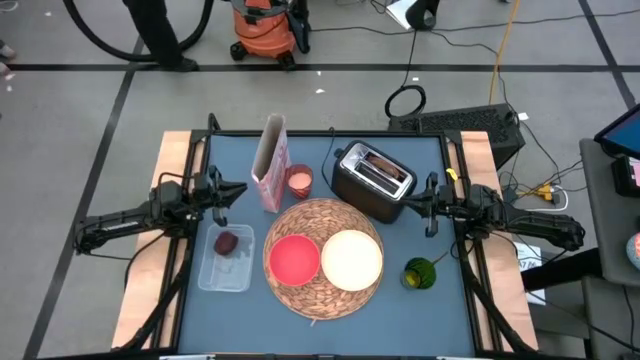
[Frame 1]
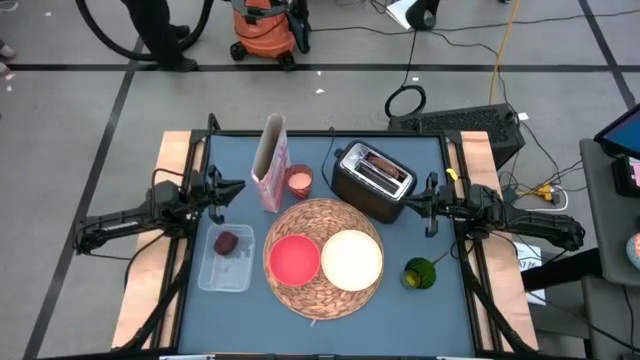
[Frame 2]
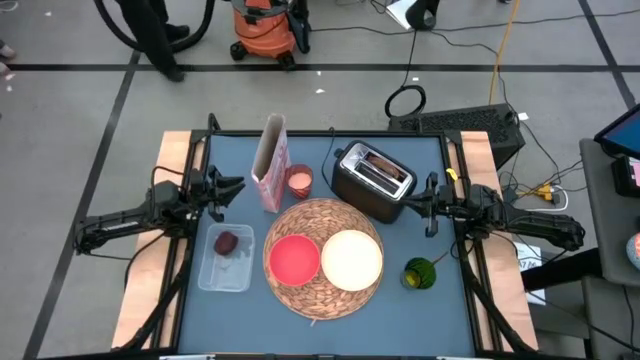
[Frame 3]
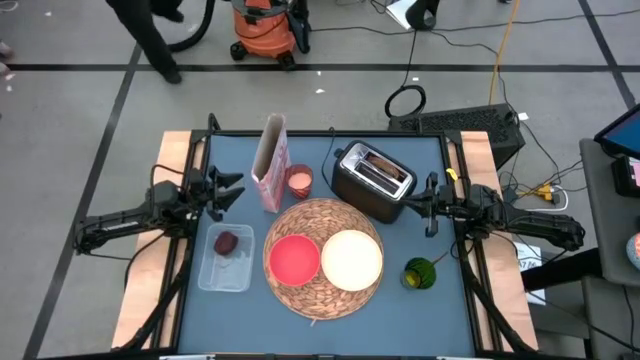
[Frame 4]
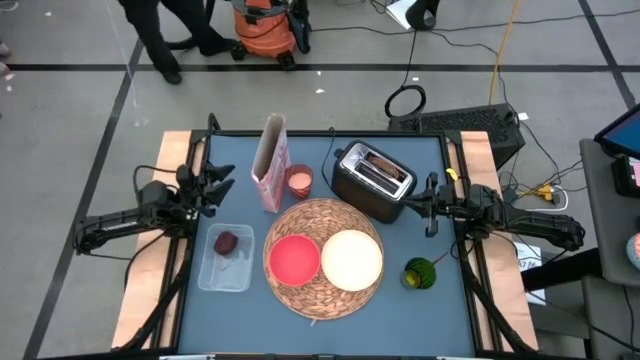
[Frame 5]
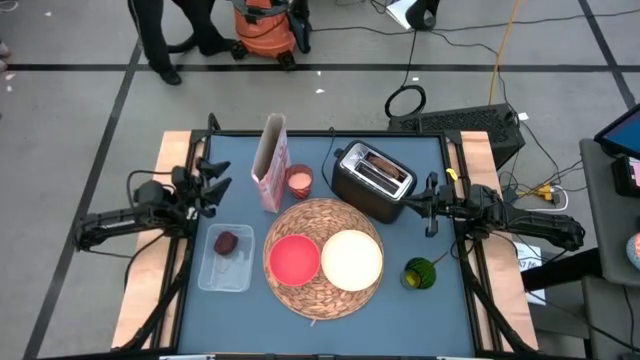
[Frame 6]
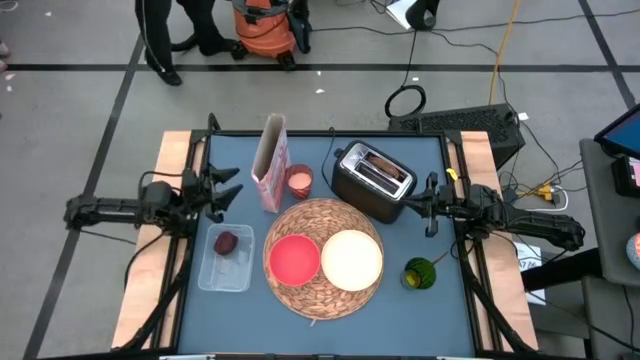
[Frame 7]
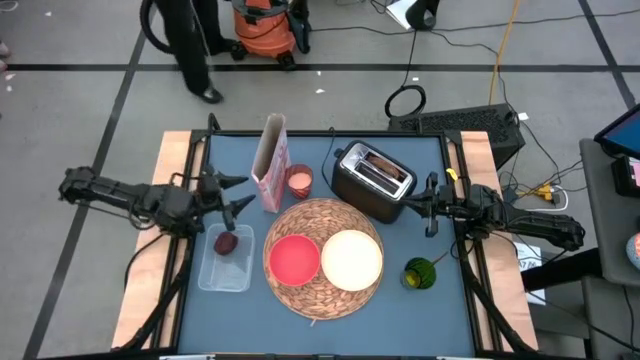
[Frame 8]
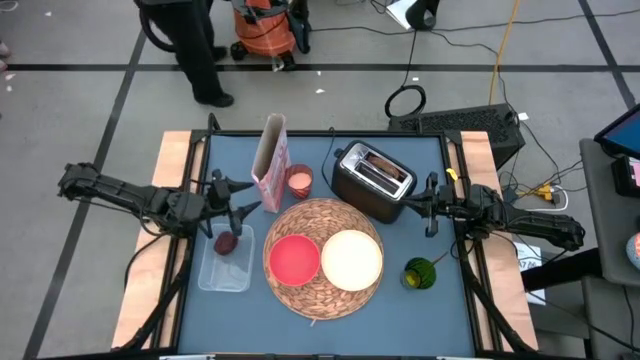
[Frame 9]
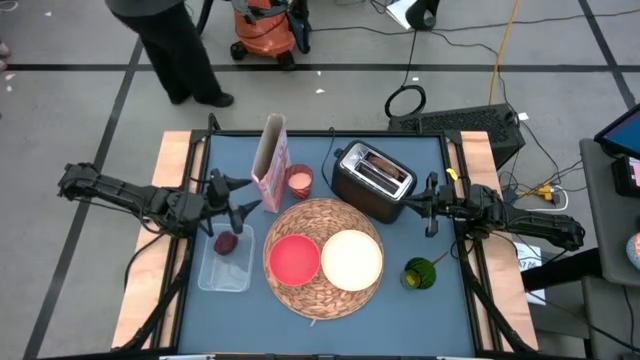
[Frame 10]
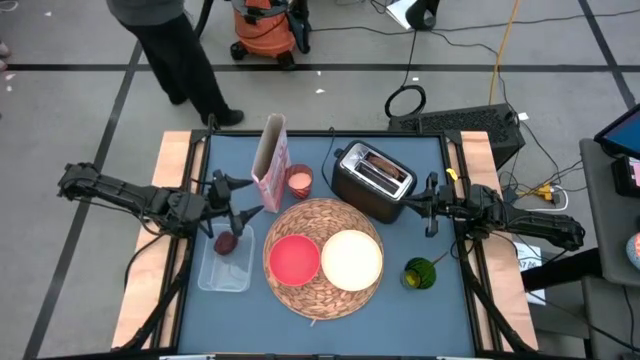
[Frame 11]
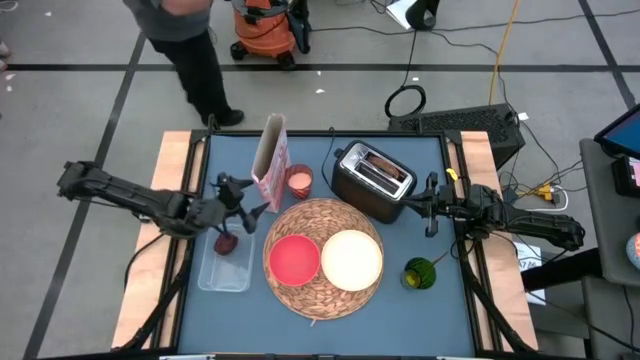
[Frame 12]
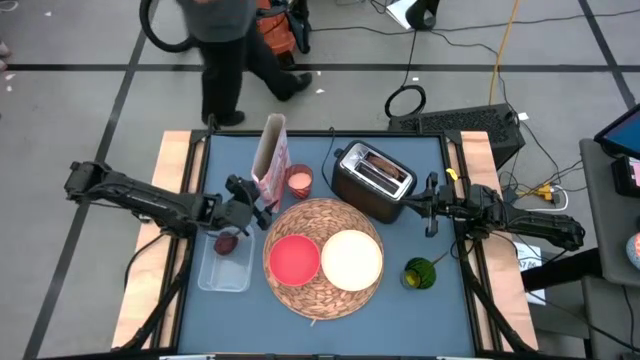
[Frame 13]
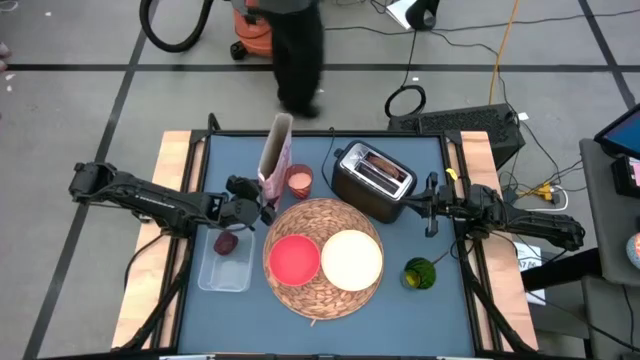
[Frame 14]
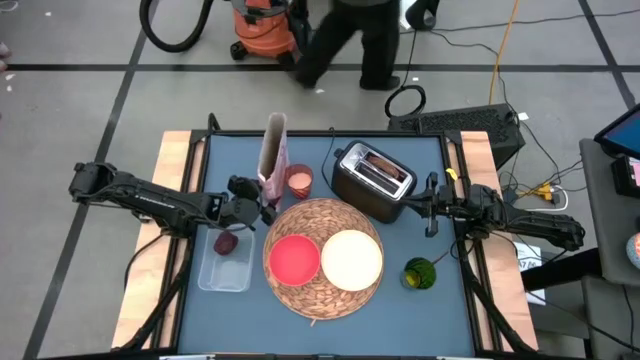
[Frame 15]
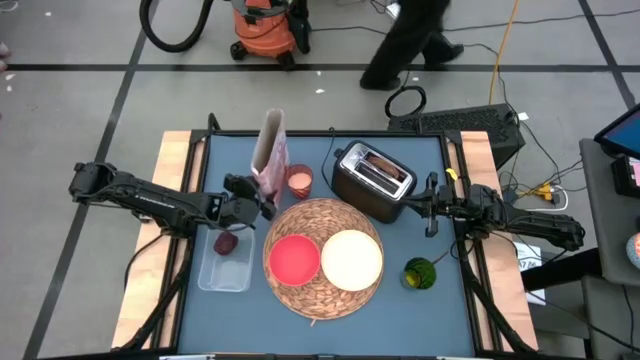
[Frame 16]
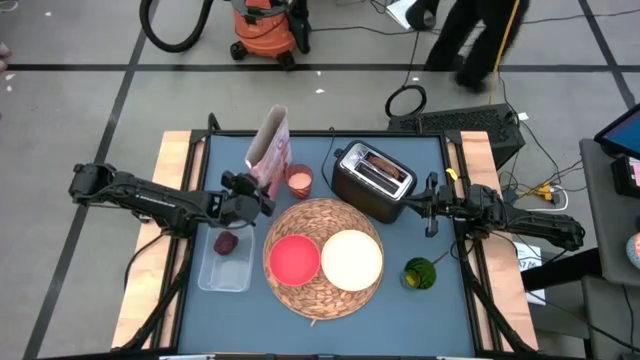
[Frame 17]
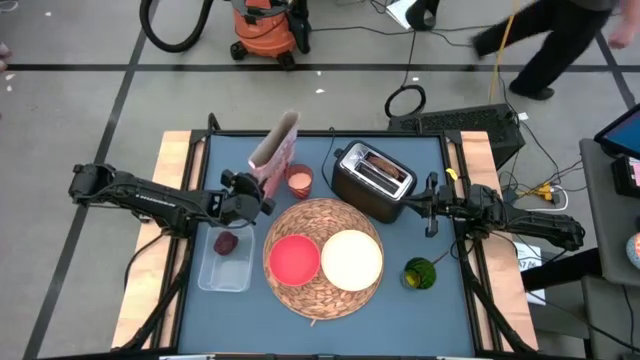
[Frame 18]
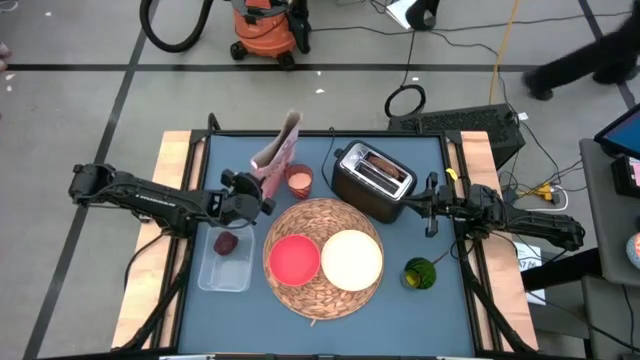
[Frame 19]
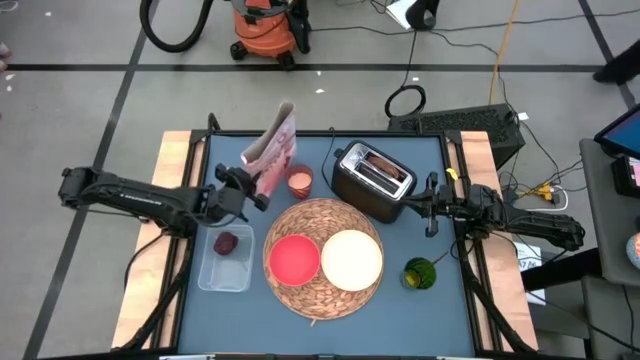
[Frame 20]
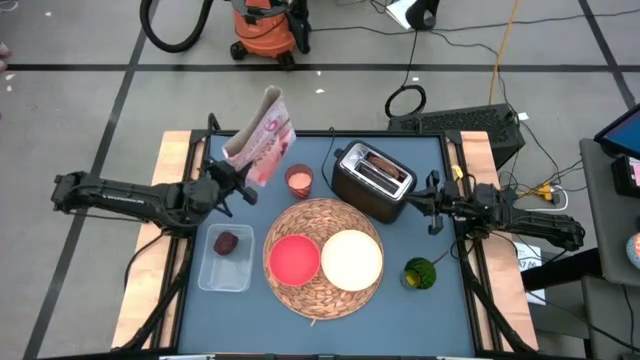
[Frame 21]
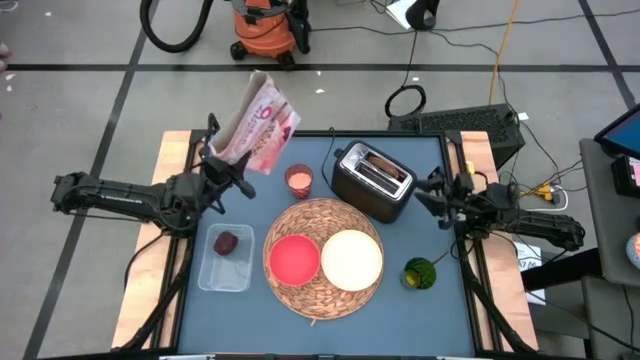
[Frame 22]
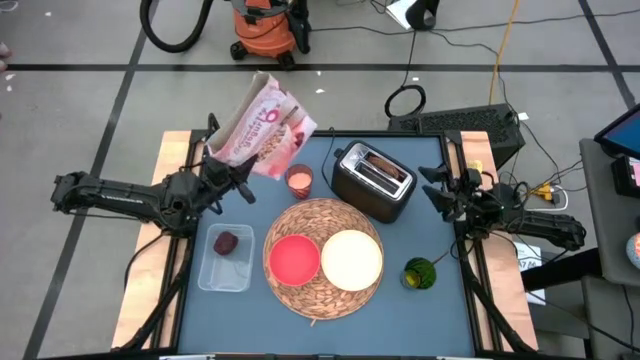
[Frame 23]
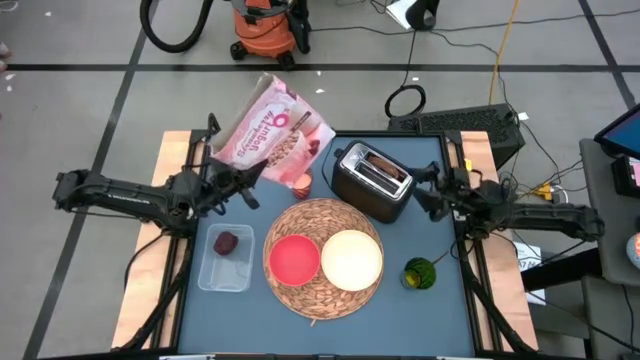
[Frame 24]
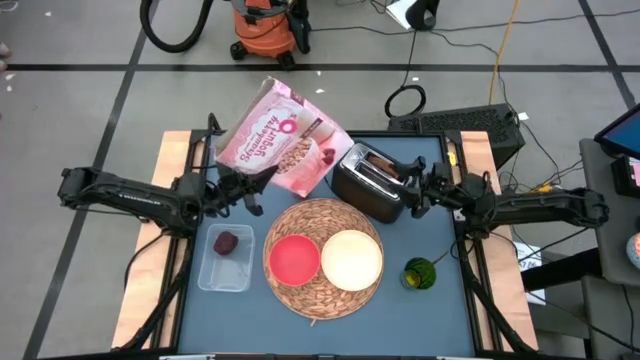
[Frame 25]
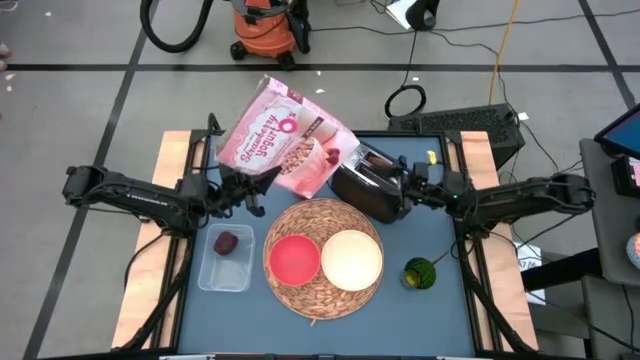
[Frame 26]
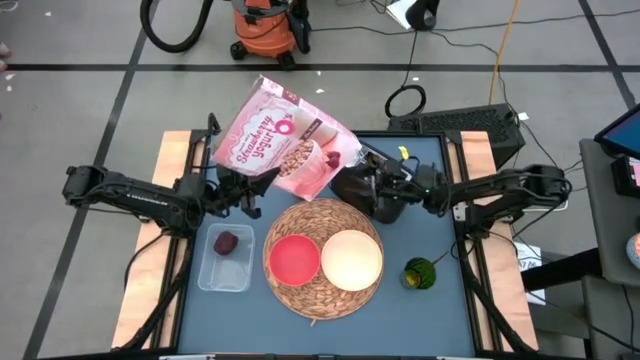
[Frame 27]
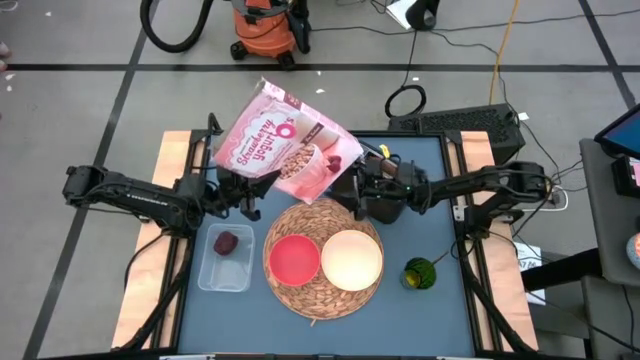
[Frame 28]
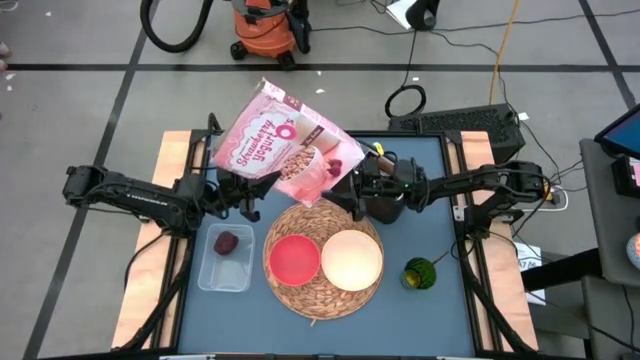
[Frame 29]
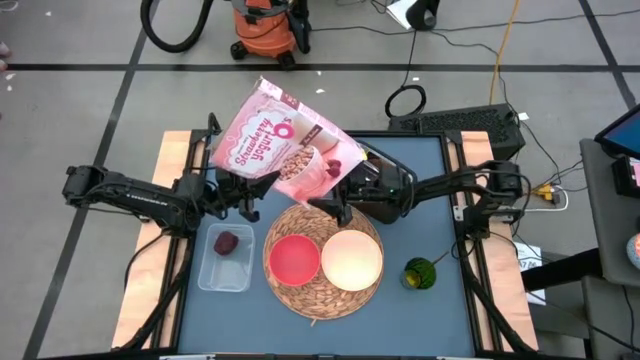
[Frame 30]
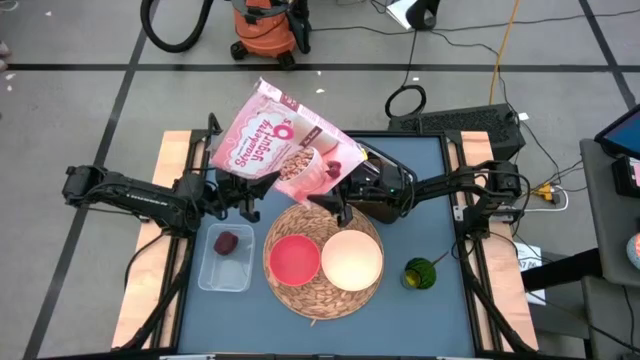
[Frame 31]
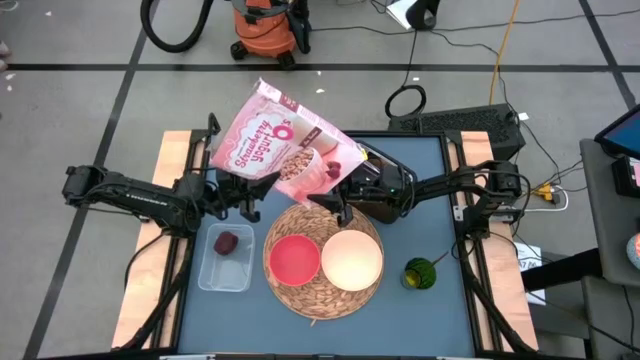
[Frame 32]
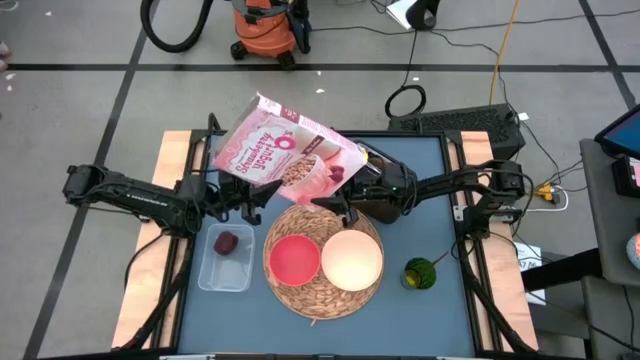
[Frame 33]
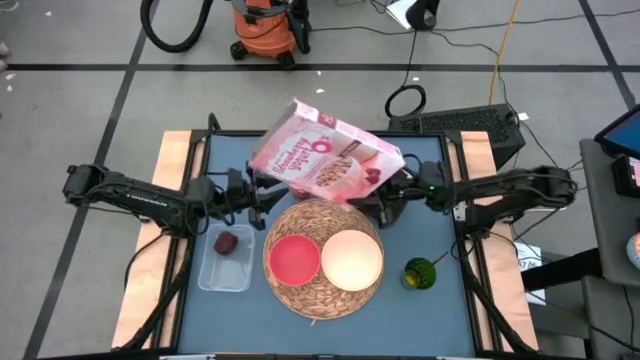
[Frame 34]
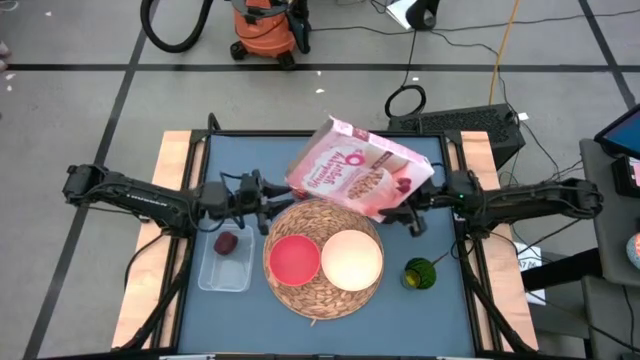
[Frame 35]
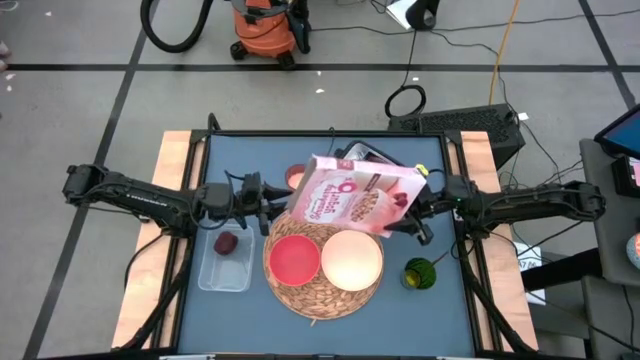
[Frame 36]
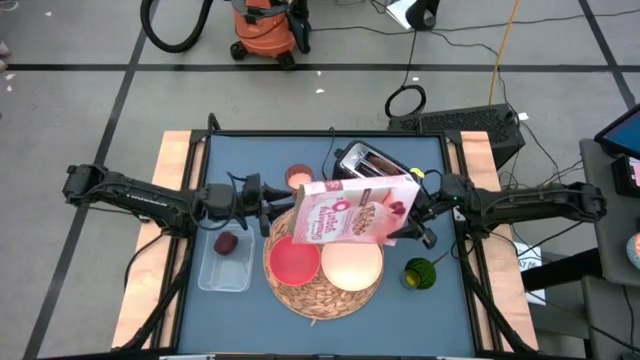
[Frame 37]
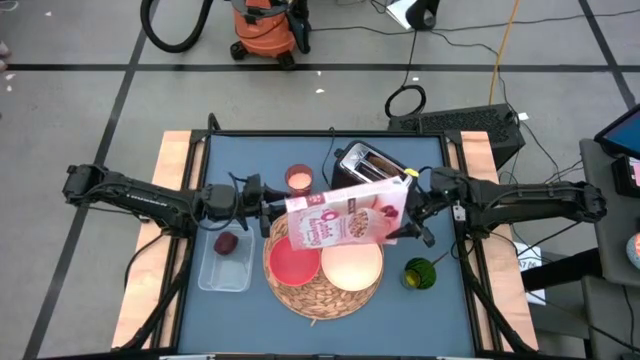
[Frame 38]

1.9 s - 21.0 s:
Task: Arrange a breakfast setting
Pour the cereal from the cereal box into the orange bowl
